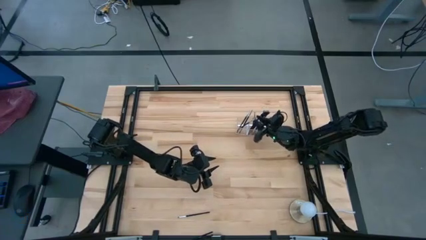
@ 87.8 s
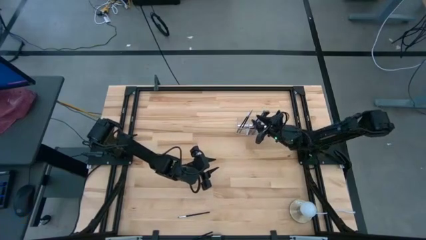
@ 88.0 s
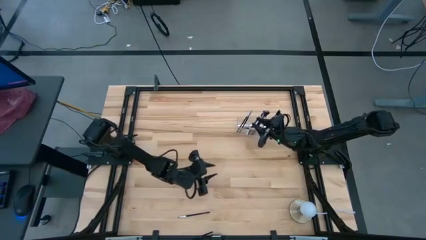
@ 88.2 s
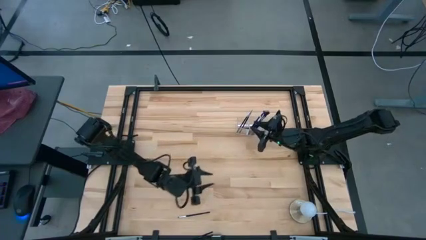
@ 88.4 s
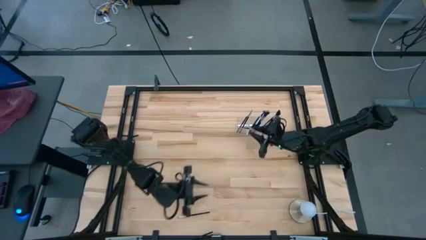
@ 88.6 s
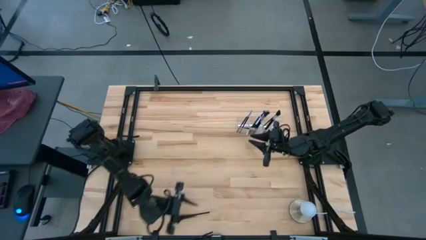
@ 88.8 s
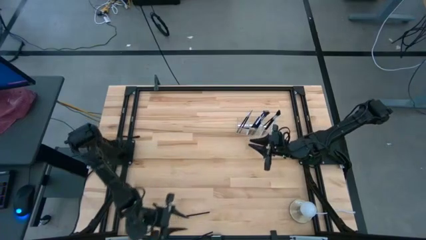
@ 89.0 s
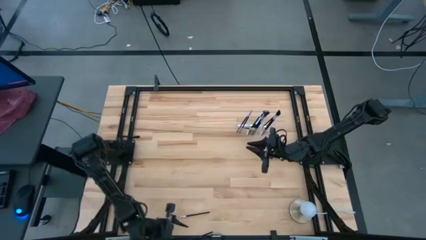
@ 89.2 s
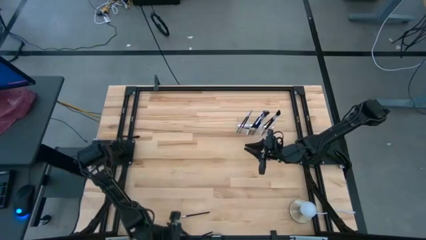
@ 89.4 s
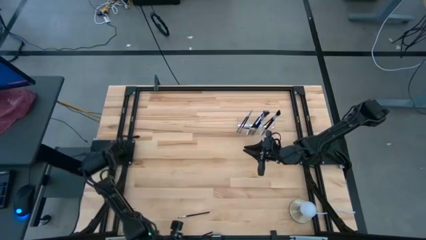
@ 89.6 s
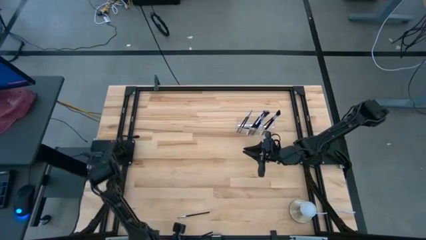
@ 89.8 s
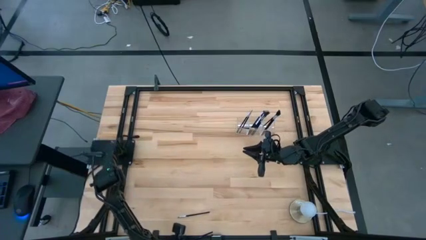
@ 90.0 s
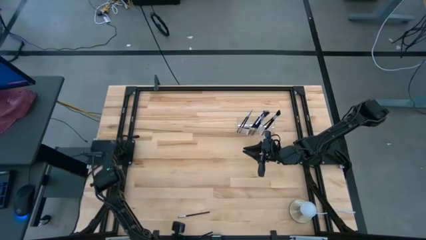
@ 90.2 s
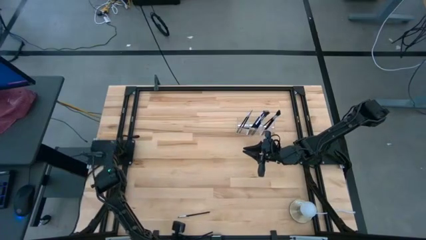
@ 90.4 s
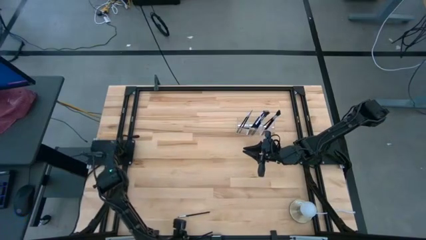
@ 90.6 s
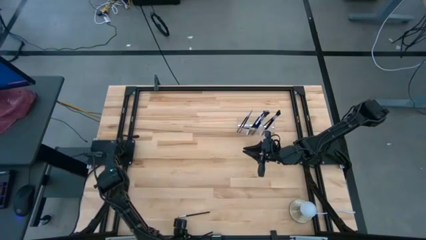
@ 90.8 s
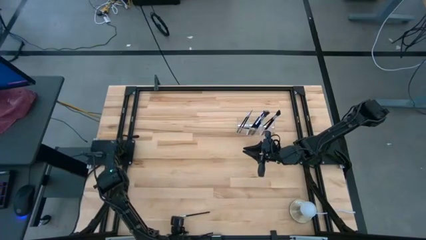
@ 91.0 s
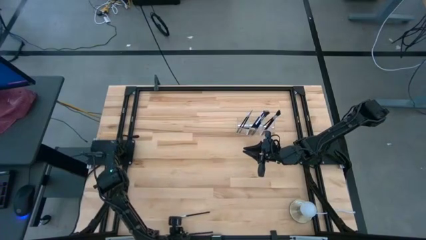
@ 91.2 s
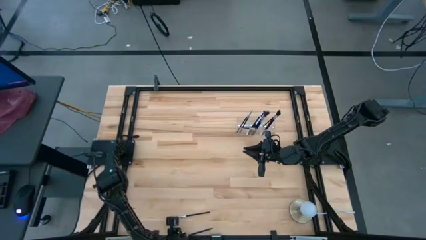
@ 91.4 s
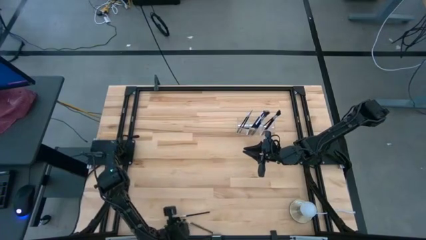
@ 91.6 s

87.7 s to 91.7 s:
Task: Put items in baskets/containers
Put the black eyeshadow brush into the transparent organizer

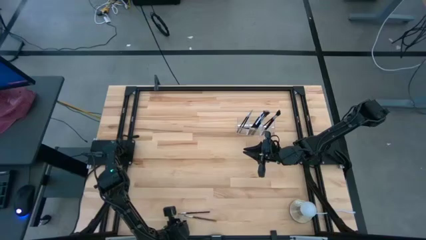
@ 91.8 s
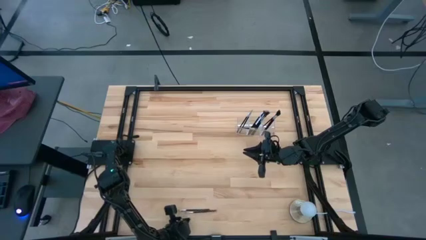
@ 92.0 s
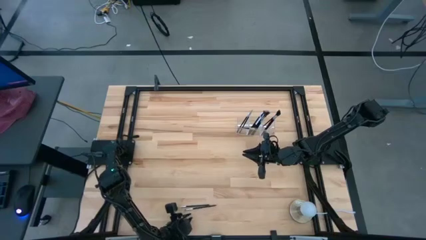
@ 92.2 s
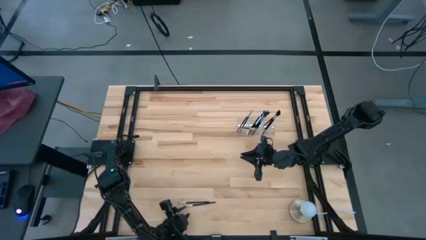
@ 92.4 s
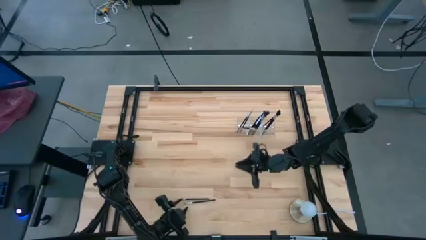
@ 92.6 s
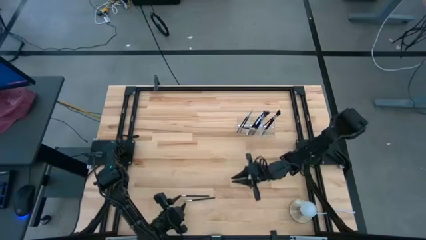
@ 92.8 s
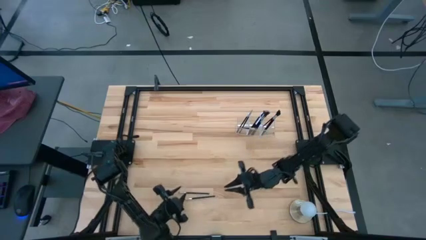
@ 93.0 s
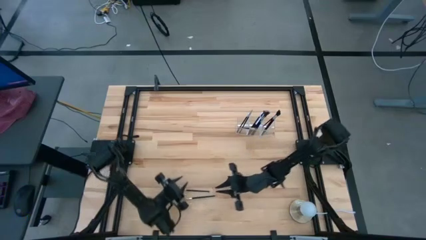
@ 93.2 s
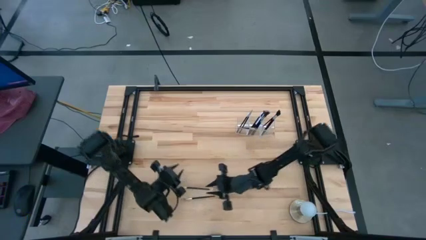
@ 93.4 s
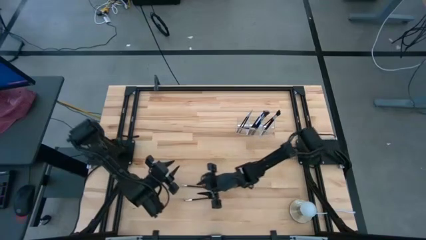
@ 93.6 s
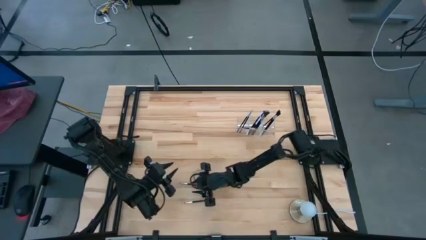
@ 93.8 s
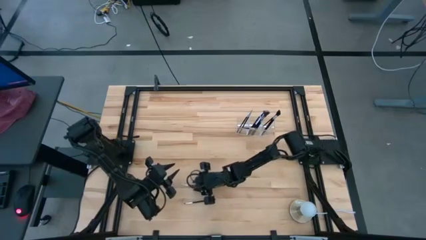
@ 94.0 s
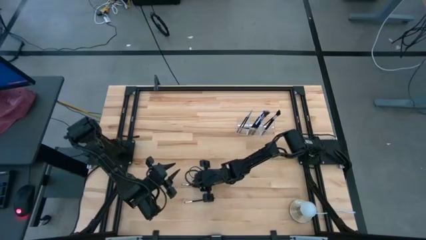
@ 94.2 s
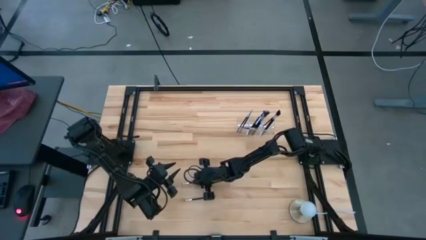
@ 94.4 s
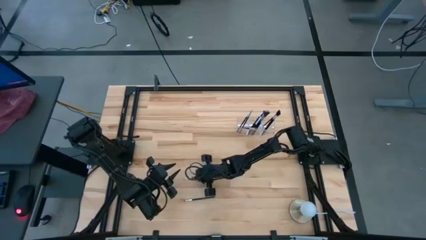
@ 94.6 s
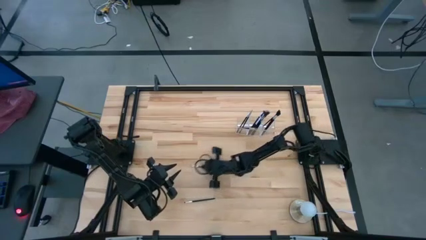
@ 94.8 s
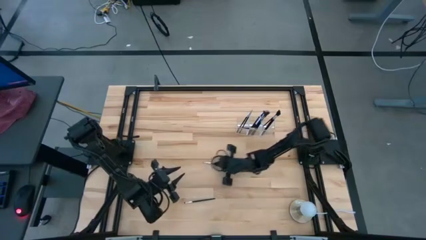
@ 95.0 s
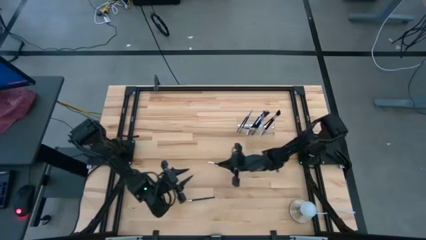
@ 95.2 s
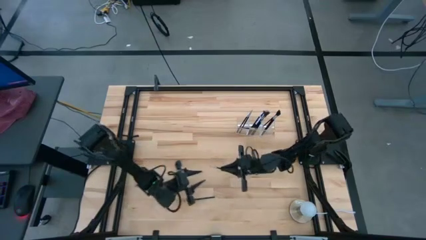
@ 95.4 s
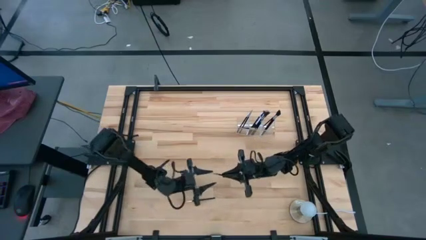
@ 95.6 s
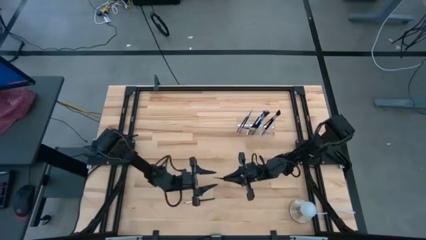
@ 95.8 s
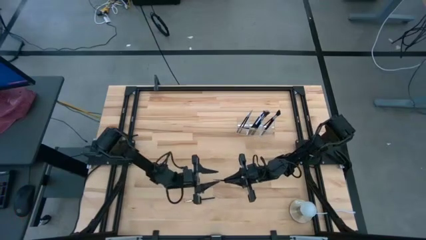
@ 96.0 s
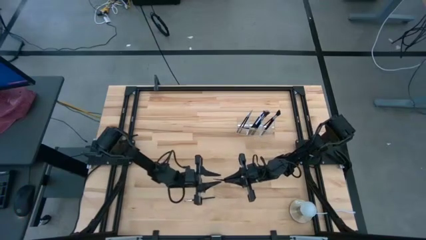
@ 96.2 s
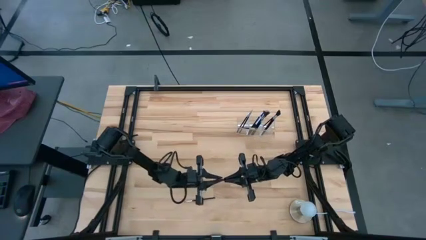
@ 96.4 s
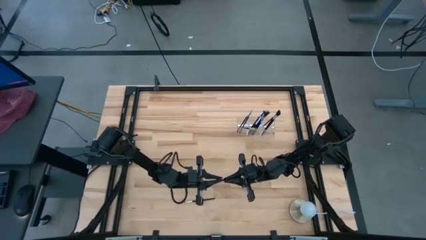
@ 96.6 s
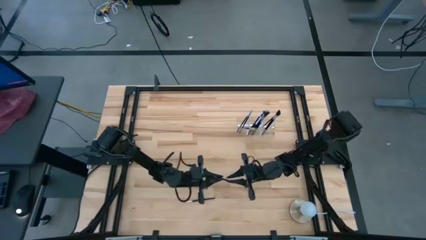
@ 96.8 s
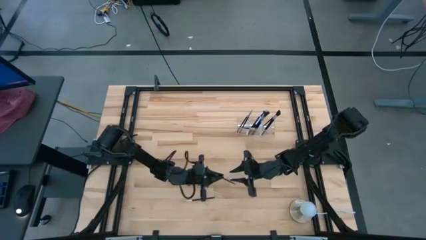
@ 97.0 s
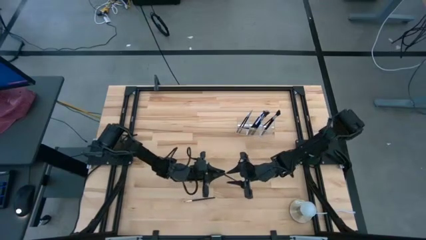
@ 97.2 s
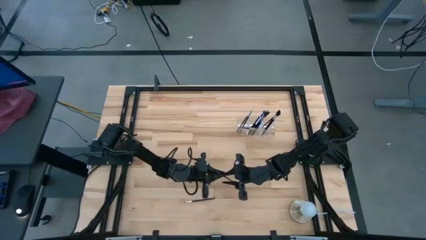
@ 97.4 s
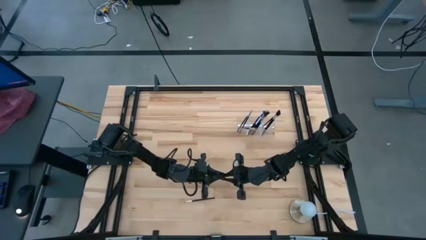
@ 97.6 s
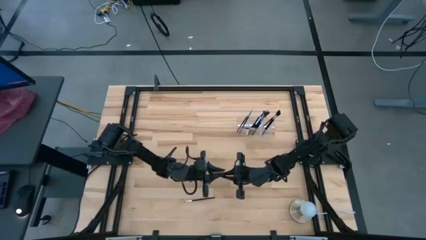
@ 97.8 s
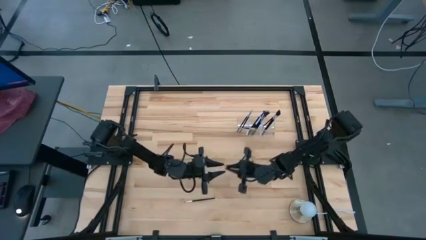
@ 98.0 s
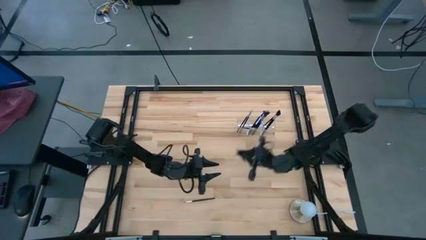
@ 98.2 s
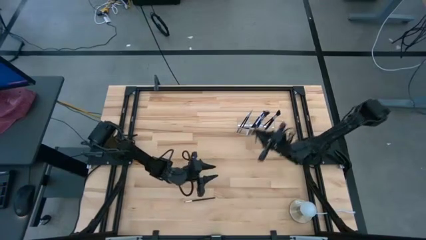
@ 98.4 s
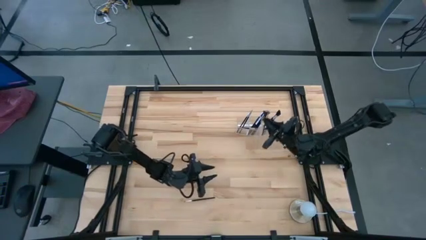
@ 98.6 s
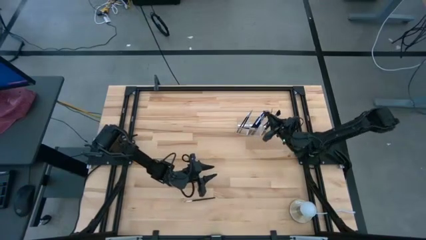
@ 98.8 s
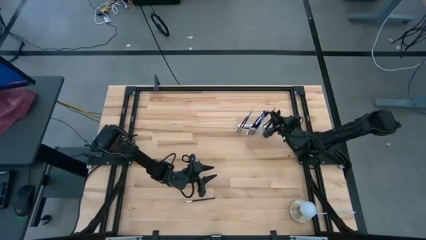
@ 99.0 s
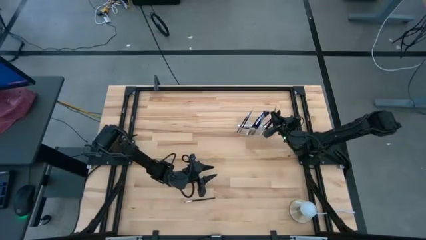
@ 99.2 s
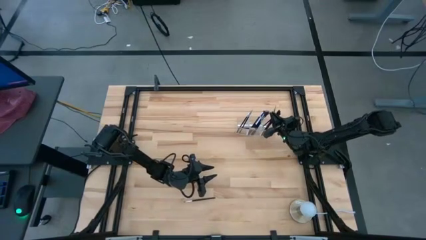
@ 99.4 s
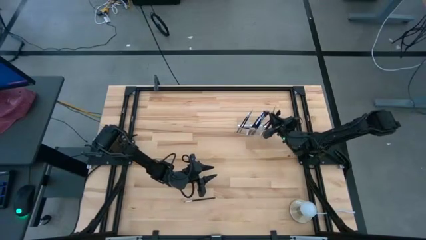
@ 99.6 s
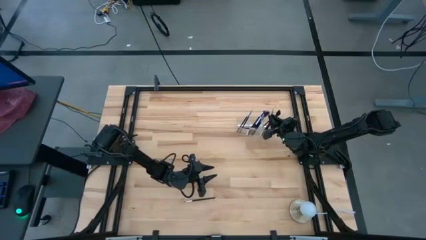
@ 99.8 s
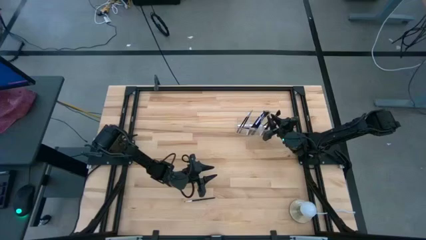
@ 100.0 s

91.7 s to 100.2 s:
Put the black eyeshadow brush into the transparent organizer

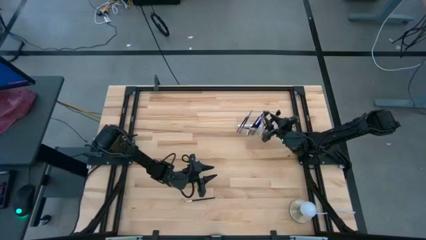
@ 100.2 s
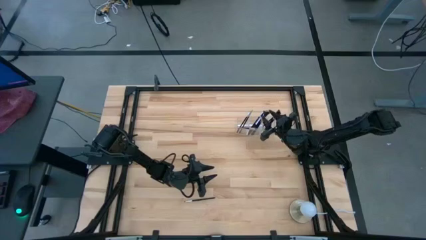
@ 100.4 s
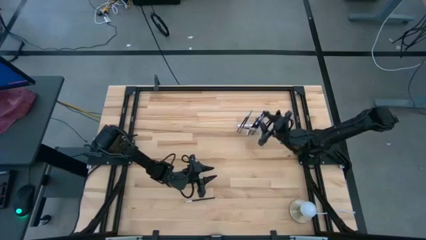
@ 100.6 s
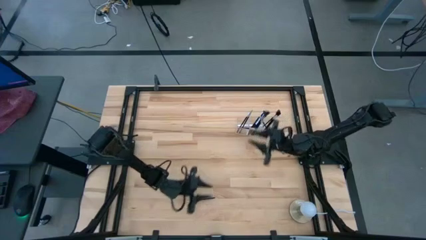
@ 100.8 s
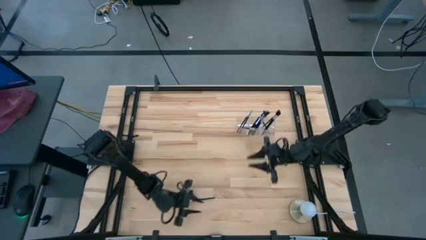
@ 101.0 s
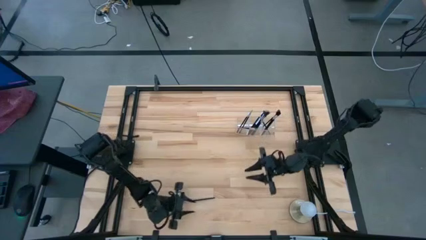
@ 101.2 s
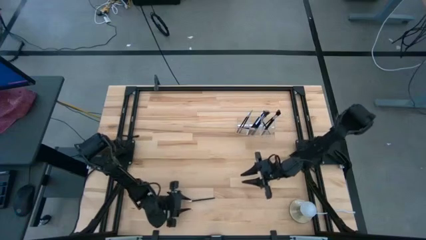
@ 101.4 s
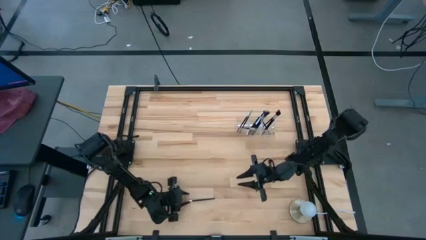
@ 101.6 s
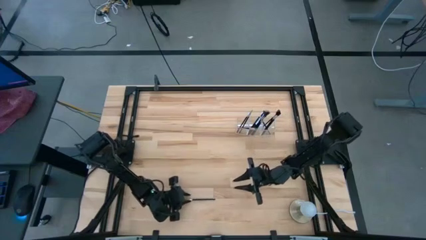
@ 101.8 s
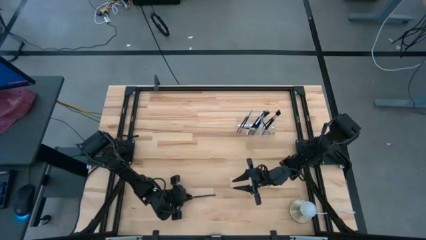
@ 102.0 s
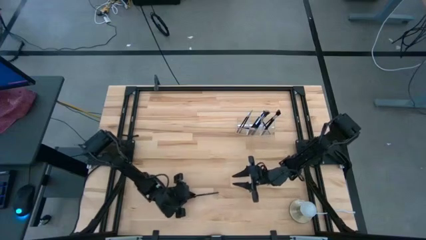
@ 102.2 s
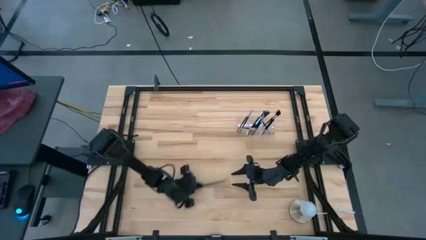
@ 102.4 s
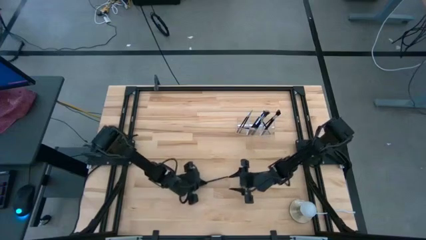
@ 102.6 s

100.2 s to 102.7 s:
Put the black eyeshadow brush into the transparent organizer

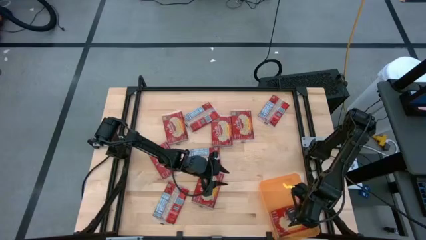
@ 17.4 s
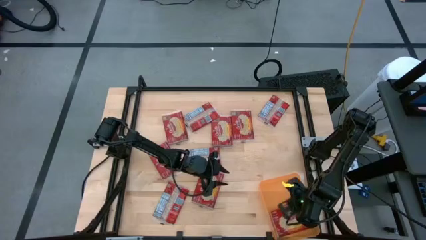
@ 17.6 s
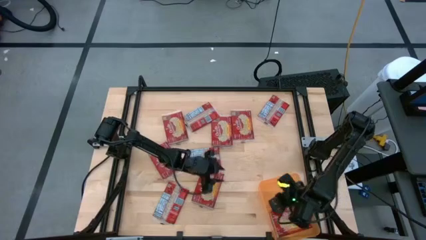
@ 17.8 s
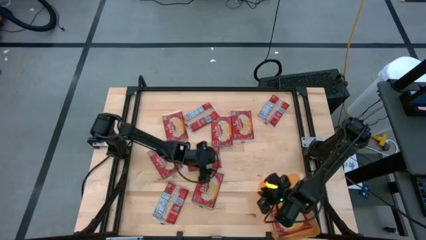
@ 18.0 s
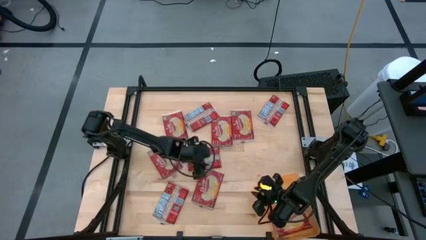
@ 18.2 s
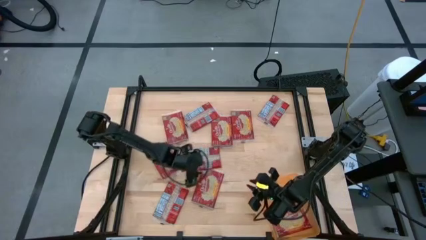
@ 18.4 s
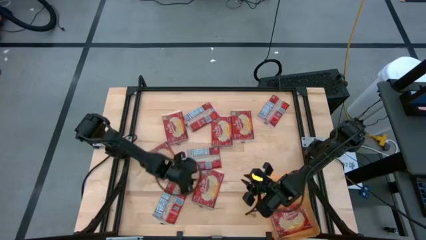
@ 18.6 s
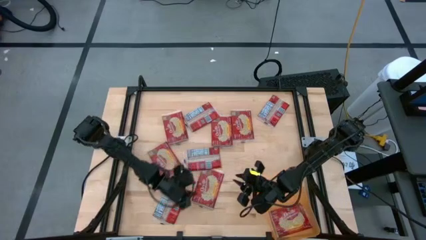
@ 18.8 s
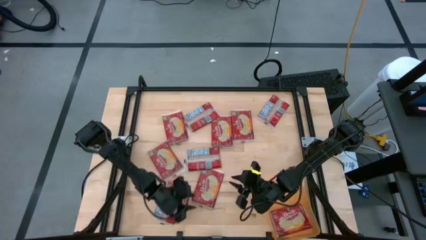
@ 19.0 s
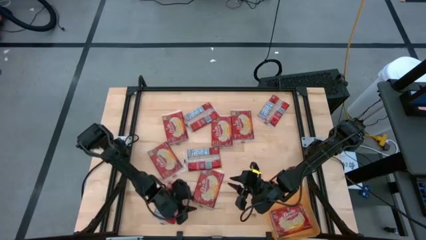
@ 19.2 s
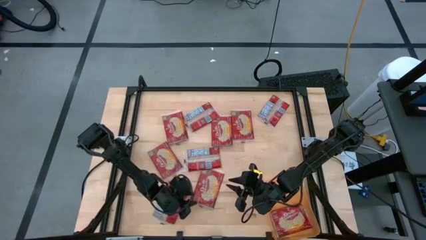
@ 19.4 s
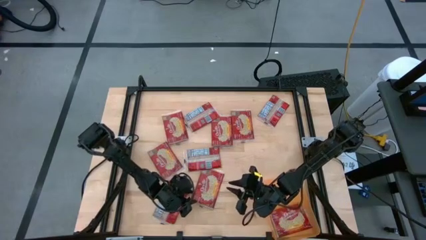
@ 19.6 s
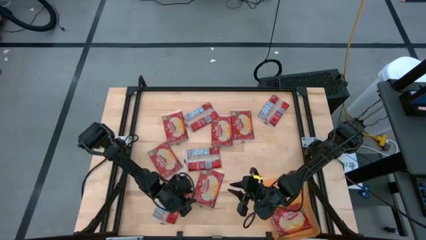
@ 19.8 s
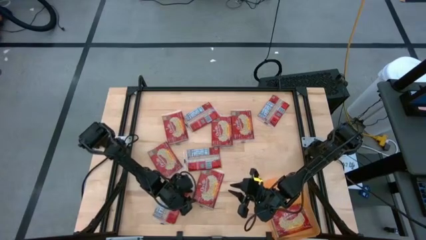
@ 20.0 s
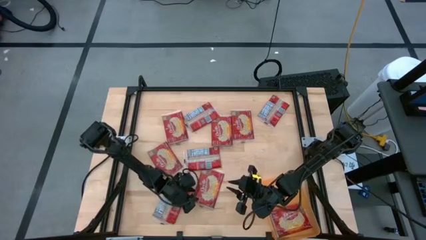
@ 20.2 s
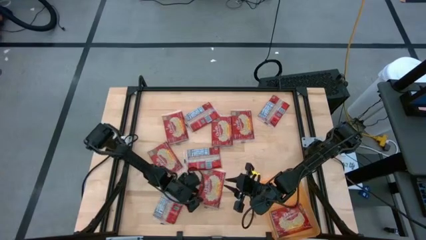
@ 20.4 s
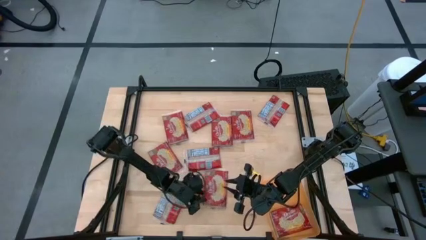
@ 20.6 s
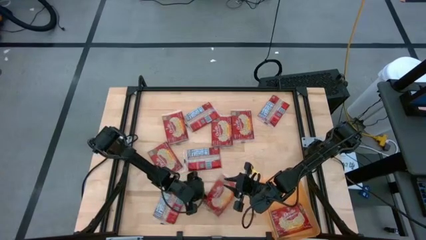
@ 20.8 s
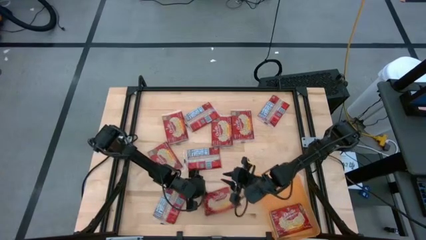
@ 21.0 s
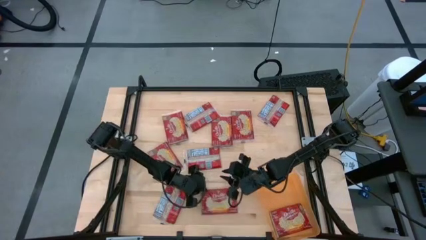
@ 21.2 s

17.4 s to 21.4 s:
Task: Sort popcorn bags into baskets
Put the popcorn pack into the orange bin
